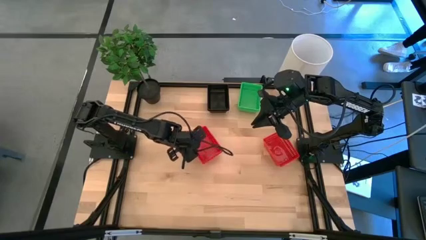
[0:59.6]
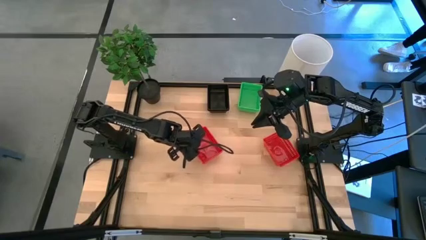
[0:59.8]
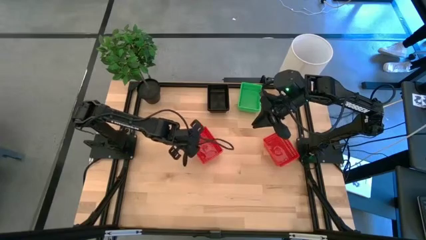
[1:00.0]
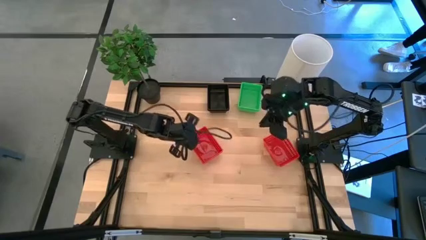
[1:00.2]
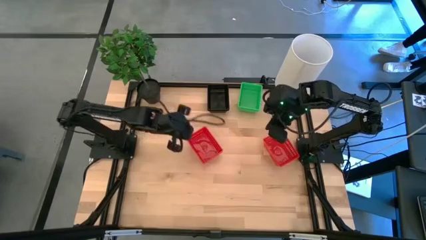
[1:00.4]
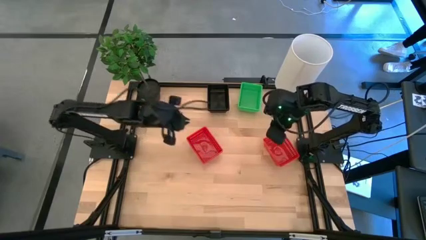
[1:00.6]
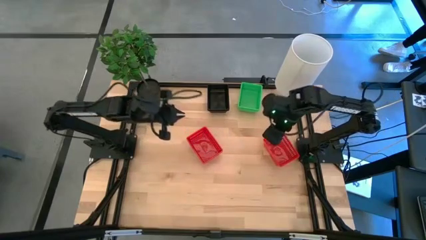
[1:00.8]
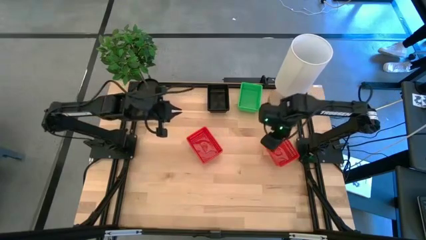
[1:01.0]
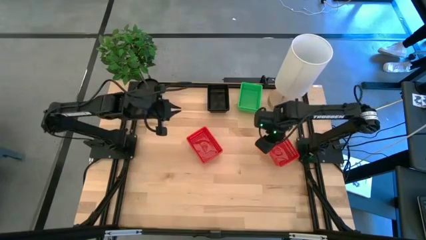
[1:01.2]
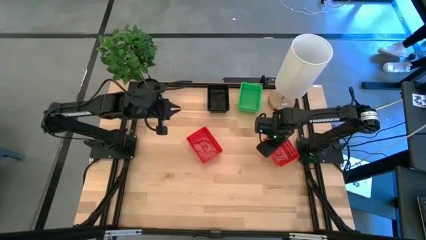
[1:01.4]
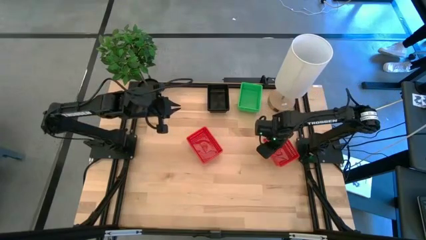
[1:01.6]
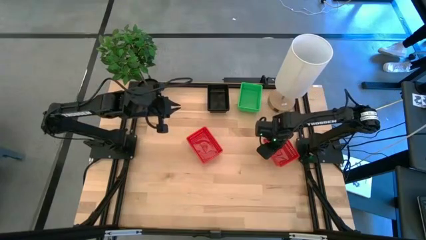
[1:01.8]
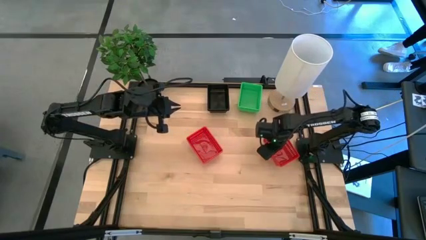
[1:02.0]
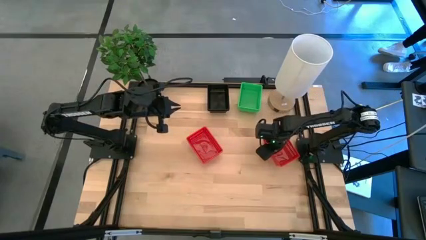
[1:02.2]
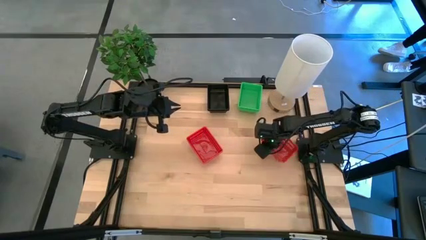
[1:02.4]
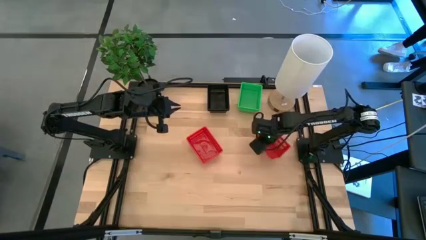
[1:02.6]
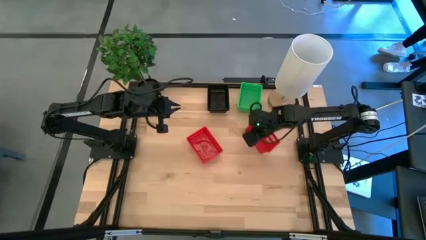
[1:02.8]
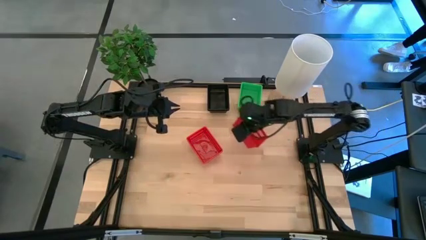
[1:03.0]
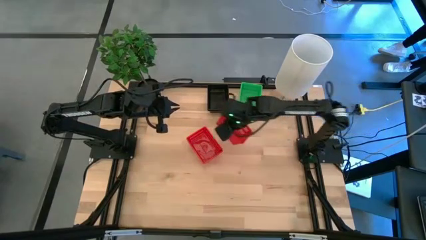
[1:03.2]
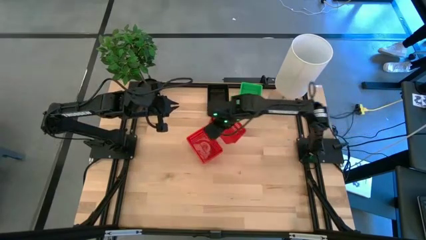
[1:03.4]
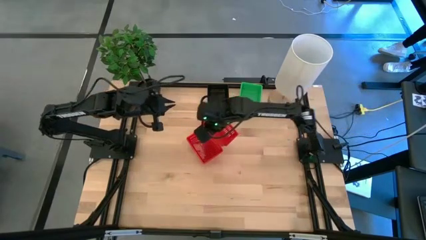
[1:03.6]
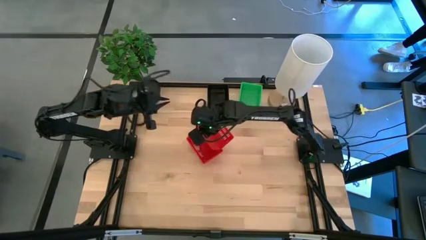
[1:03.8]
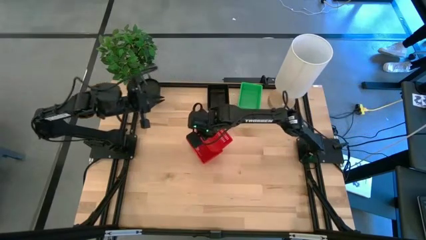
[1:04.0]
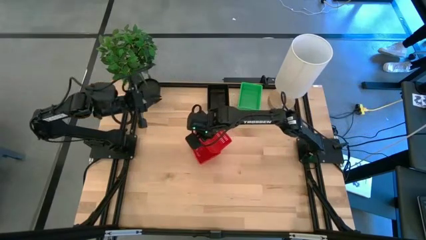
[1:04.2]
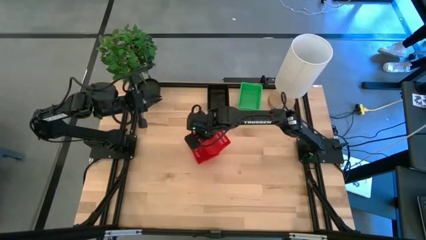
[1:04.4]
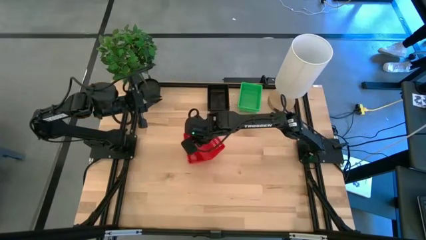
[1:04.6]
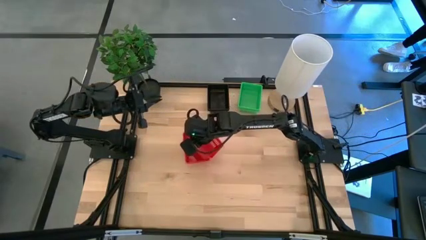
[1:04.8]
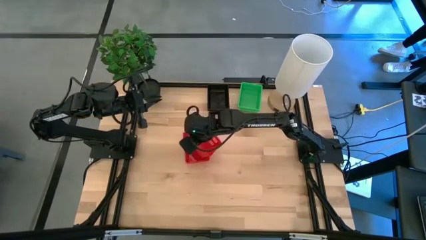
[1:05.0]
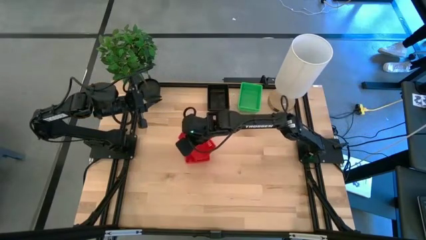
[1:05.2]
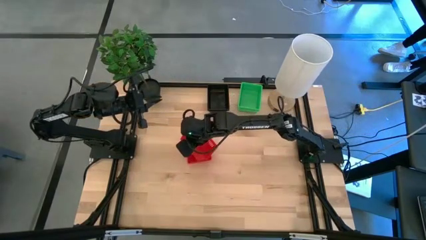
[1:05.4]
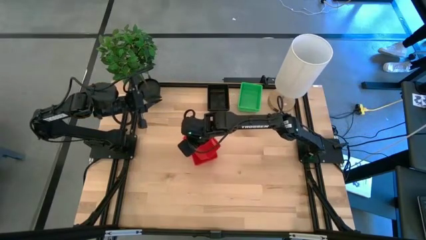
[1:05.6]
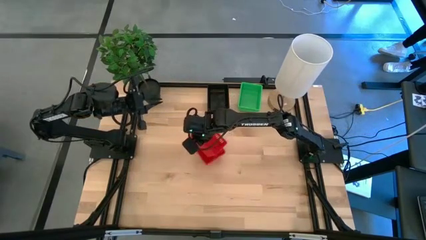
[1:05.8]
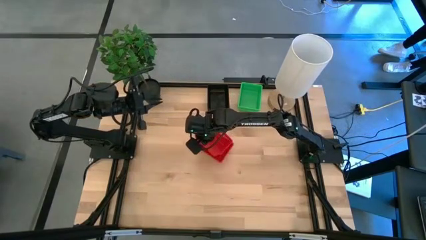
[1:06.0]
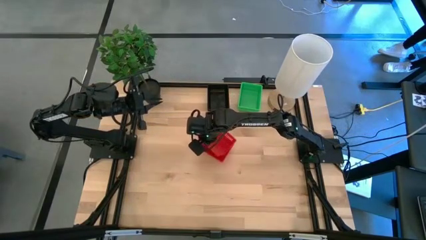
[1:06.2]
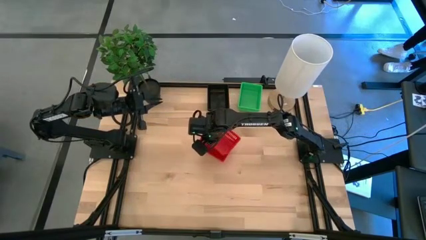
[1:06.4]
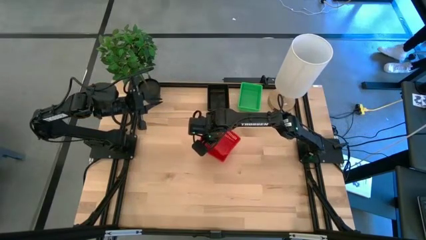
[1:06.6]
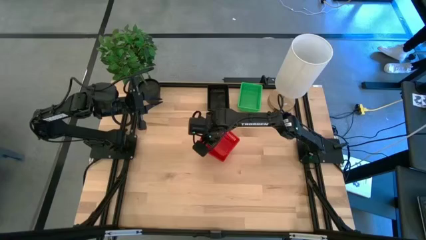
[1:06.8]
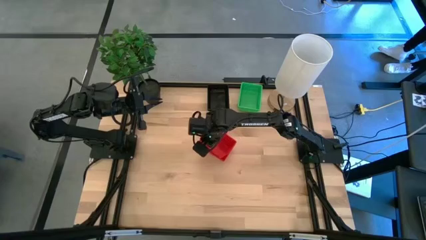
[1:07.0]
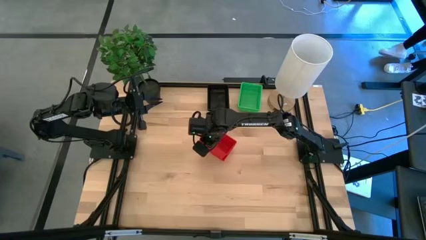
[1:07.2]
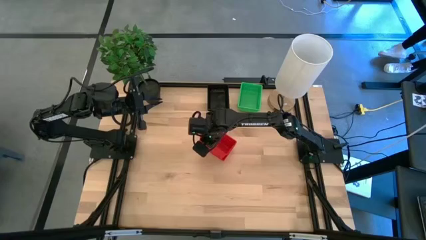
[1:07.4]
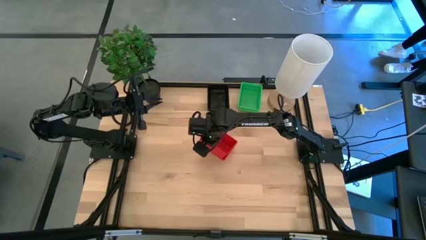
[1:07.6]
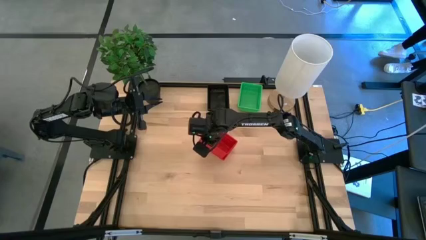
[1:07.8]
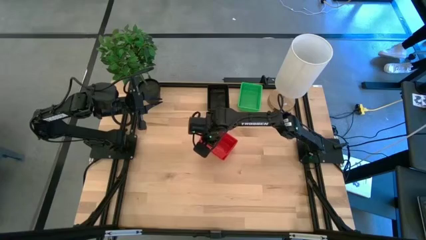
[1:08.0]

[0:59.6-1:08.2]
Stack the right red bin on the left red bins

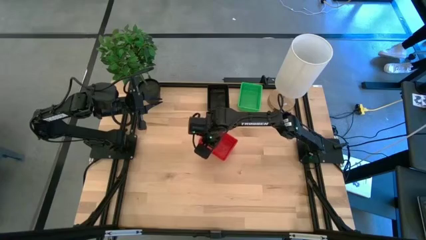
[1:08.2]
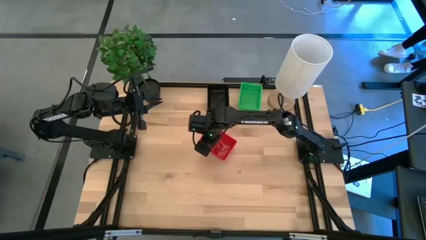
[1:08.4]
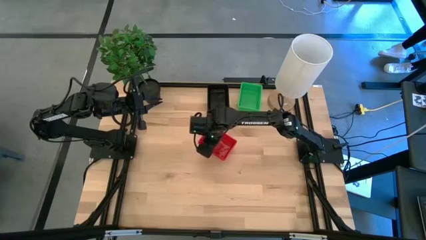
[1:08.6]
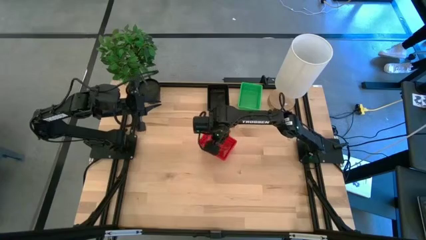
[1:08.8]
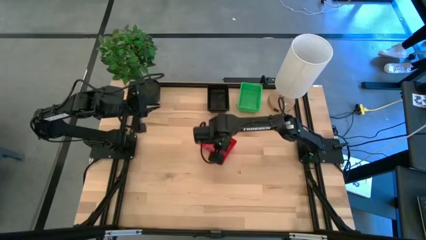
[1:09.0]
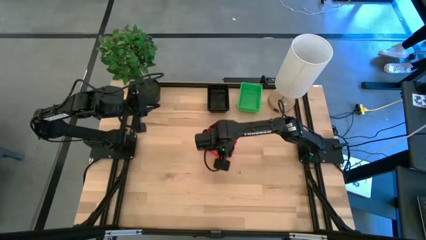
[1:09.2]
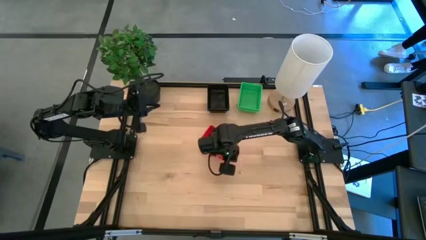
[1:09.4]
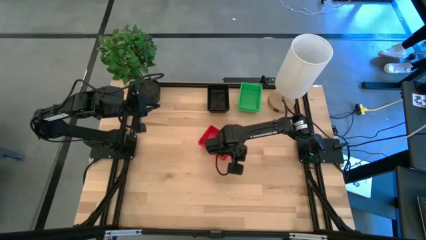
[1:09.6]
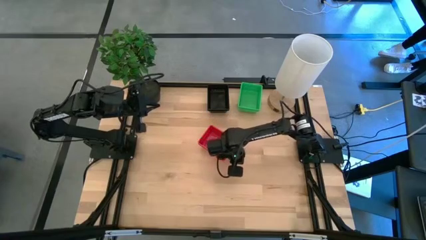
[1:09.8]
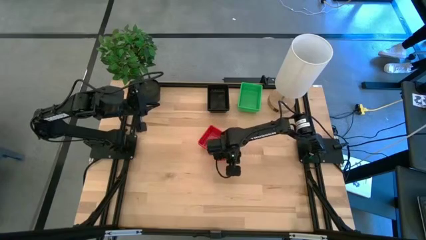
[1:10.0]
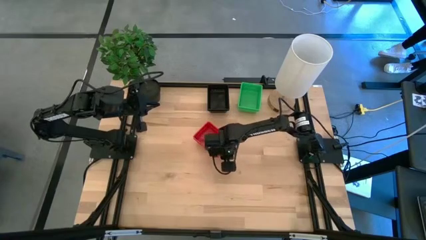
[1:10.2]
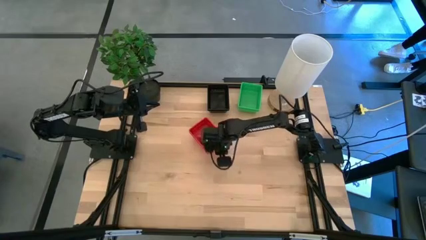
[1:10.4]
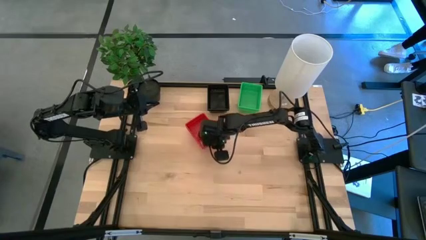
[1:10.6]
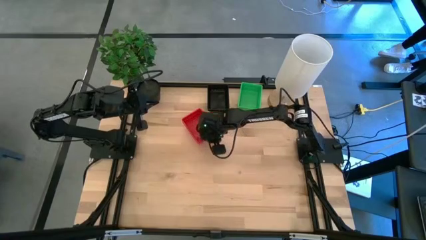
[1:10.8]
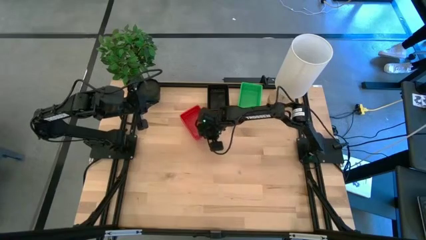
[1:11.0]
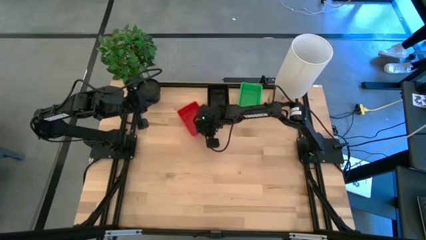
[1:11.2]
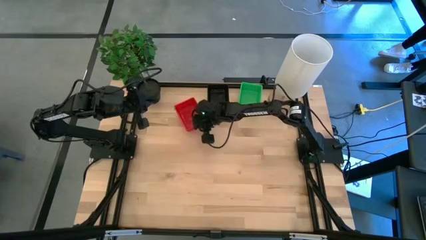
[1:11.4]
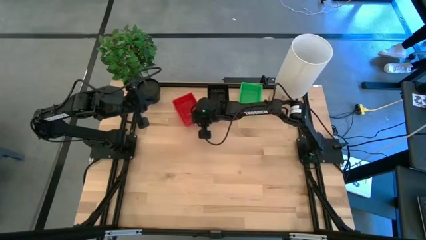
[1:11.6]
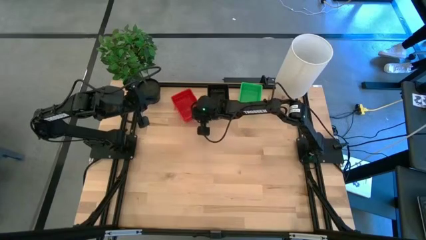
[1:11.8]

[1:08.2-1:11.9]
Move the stacked red bins to the left of the stacked black bins
